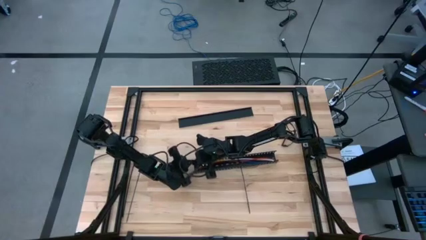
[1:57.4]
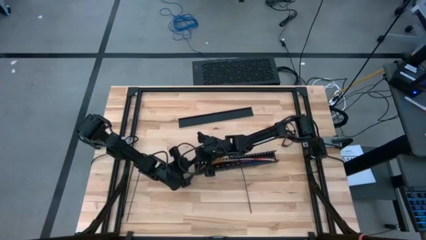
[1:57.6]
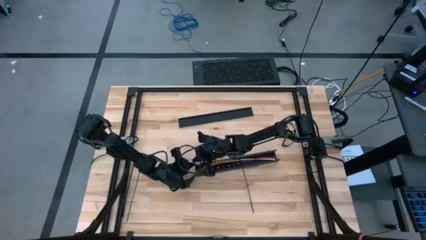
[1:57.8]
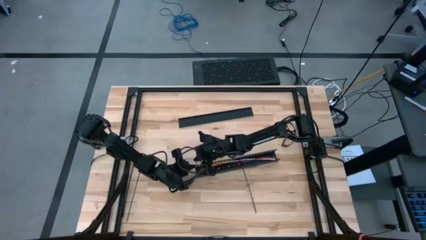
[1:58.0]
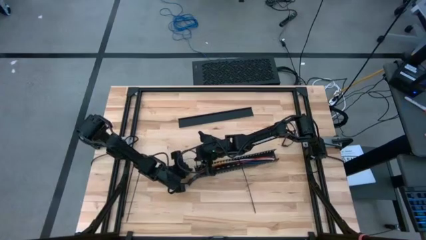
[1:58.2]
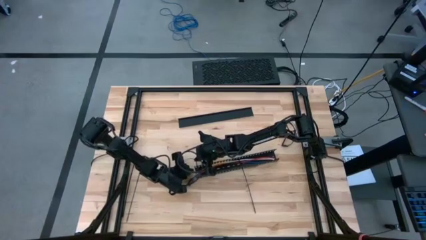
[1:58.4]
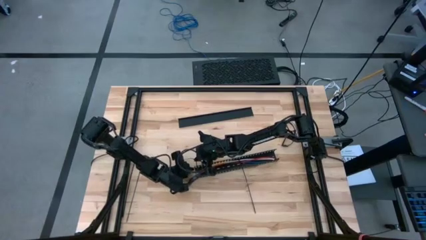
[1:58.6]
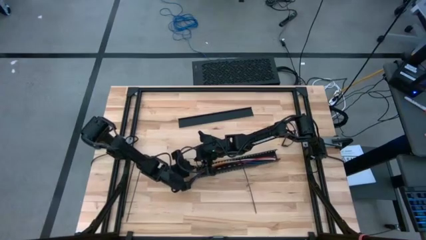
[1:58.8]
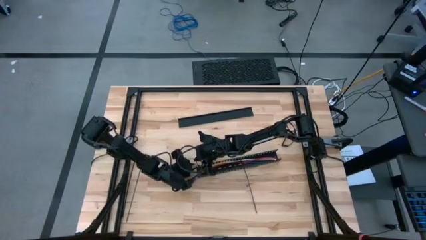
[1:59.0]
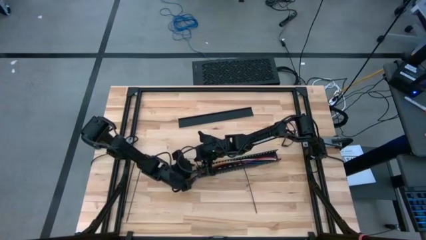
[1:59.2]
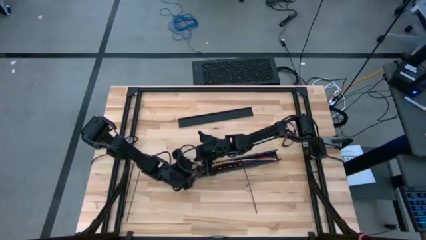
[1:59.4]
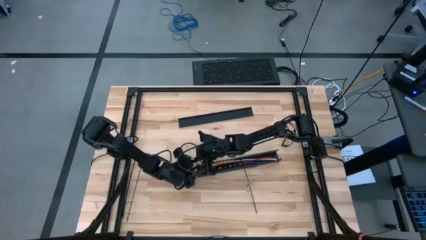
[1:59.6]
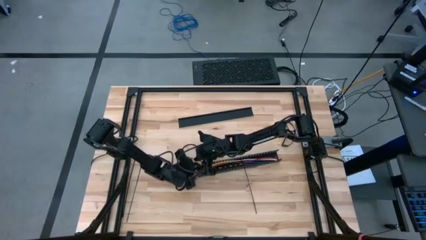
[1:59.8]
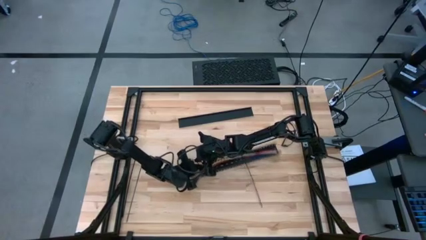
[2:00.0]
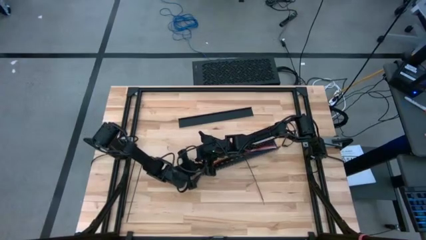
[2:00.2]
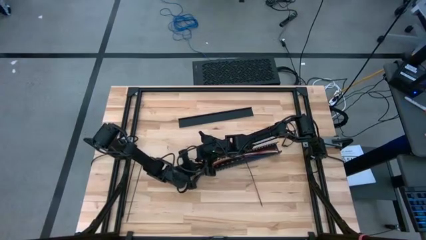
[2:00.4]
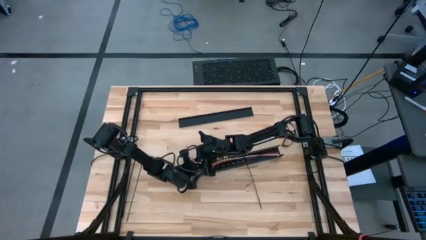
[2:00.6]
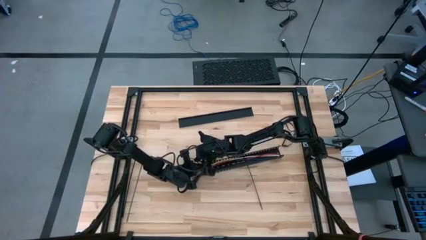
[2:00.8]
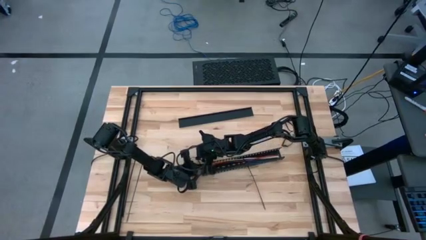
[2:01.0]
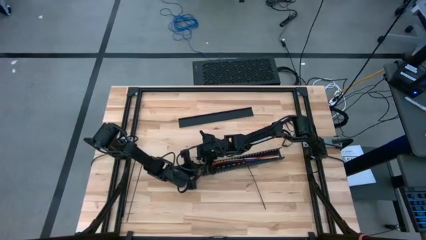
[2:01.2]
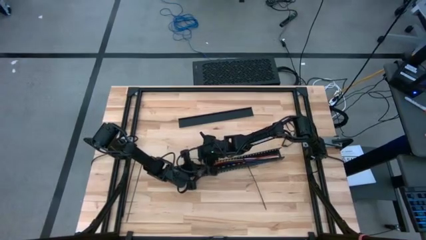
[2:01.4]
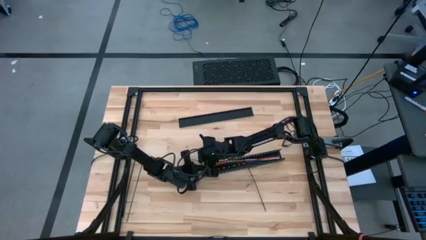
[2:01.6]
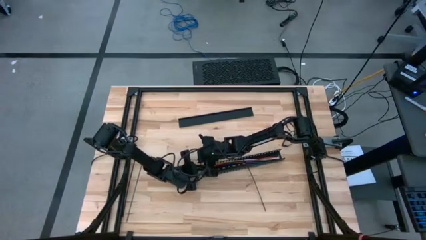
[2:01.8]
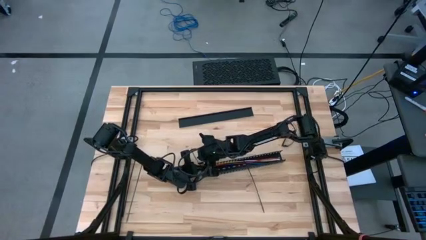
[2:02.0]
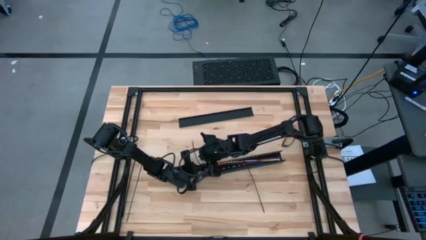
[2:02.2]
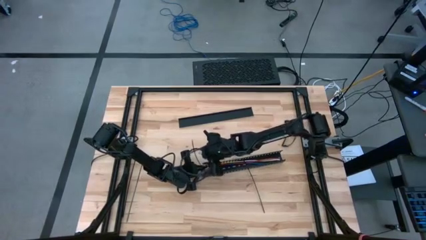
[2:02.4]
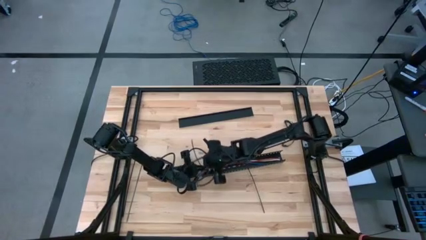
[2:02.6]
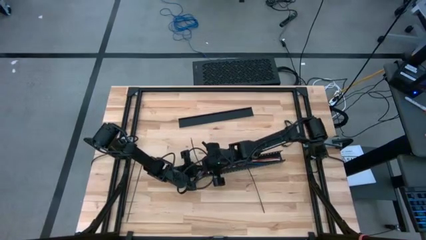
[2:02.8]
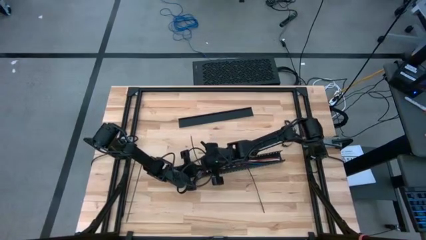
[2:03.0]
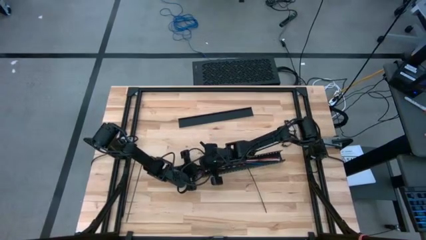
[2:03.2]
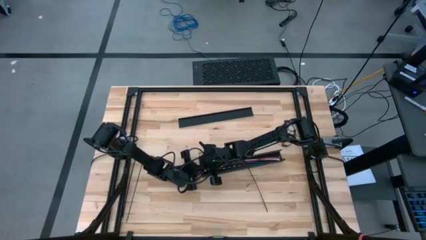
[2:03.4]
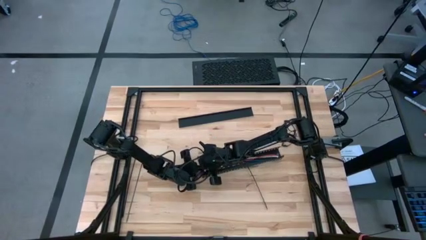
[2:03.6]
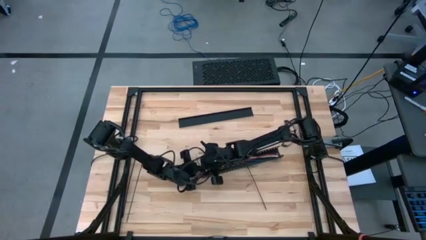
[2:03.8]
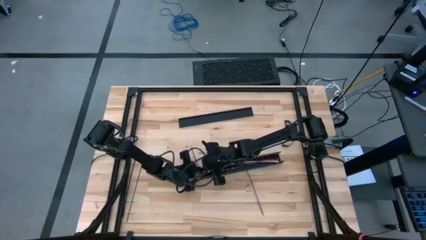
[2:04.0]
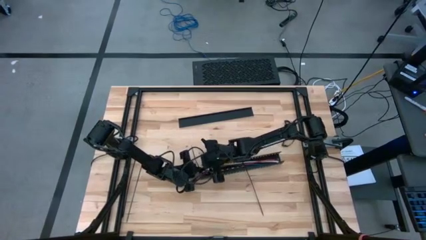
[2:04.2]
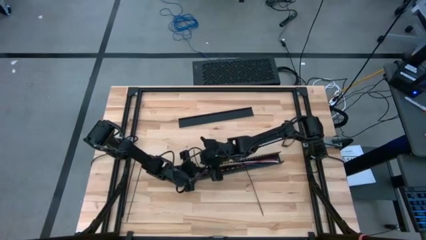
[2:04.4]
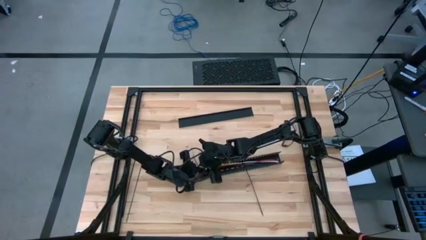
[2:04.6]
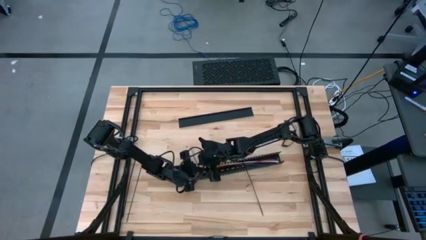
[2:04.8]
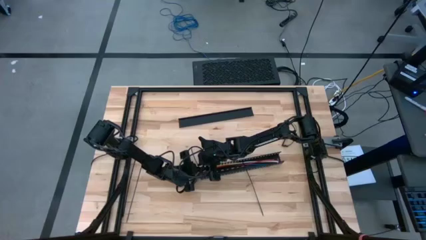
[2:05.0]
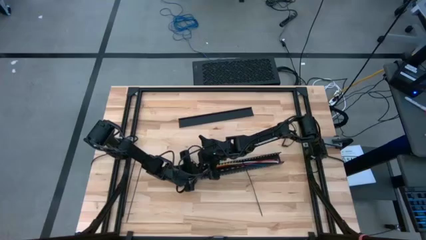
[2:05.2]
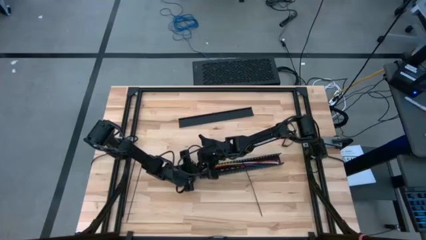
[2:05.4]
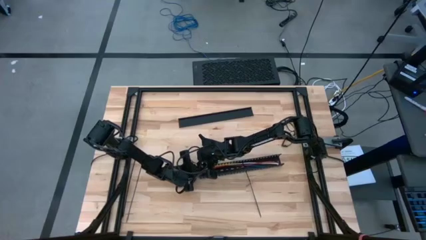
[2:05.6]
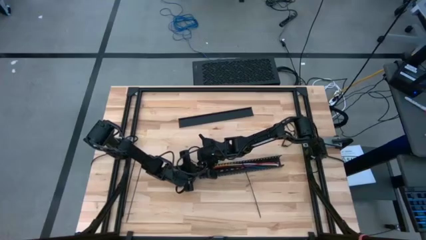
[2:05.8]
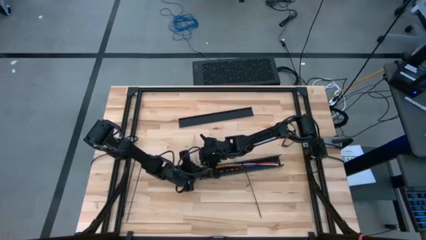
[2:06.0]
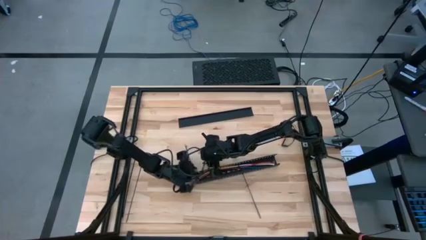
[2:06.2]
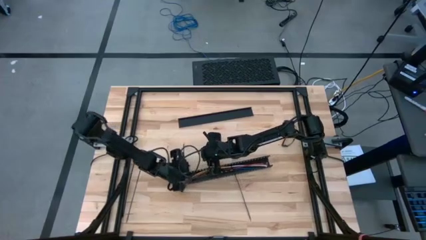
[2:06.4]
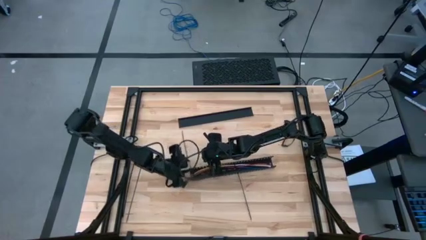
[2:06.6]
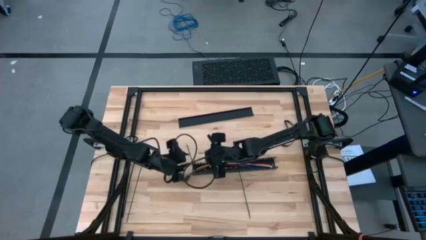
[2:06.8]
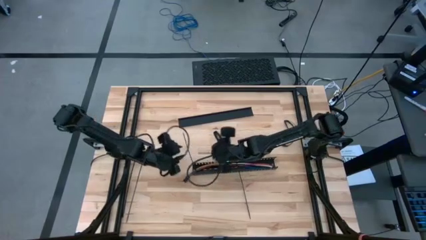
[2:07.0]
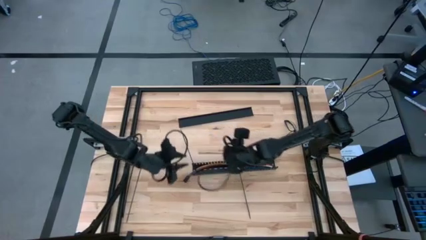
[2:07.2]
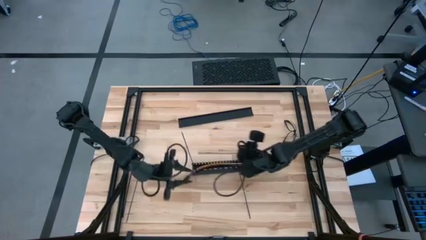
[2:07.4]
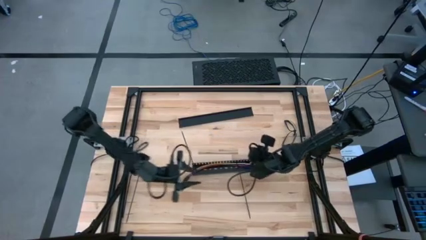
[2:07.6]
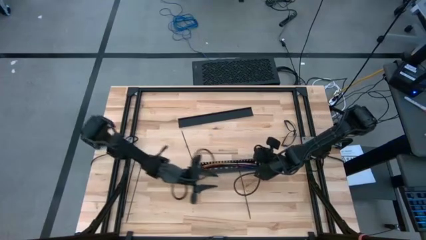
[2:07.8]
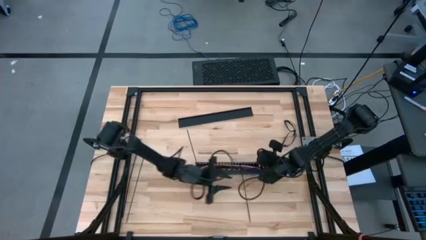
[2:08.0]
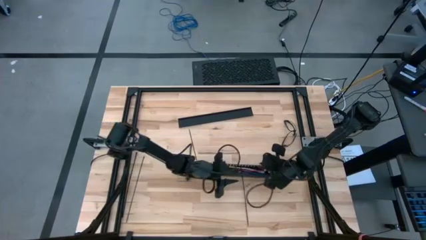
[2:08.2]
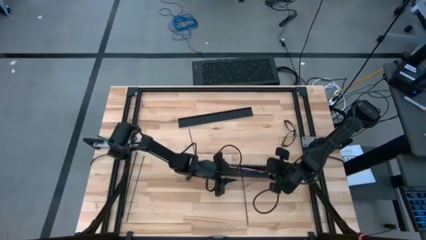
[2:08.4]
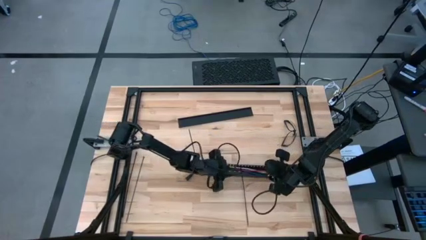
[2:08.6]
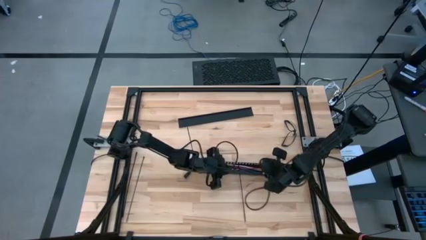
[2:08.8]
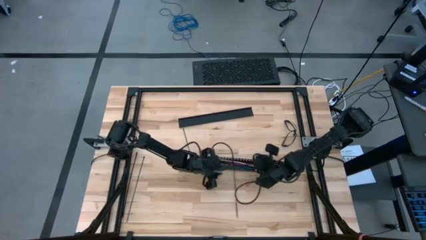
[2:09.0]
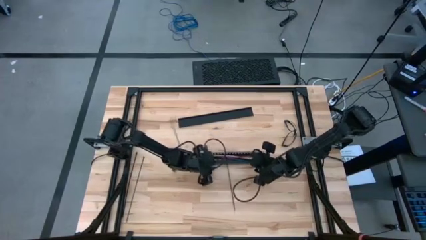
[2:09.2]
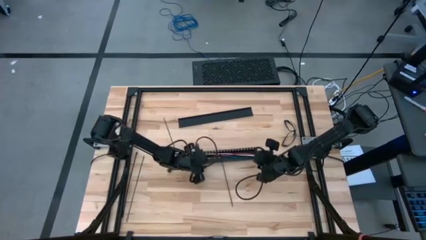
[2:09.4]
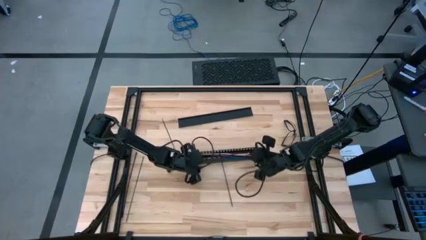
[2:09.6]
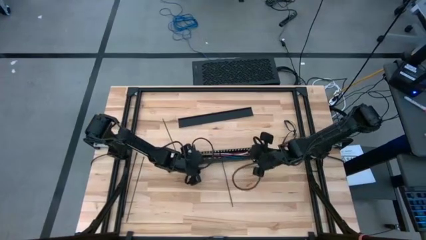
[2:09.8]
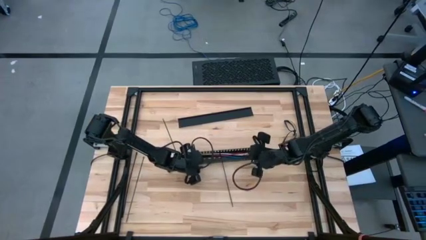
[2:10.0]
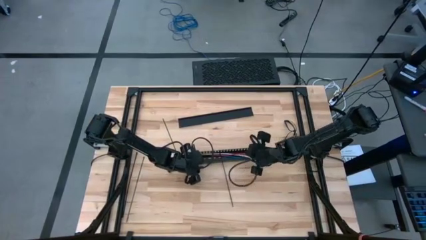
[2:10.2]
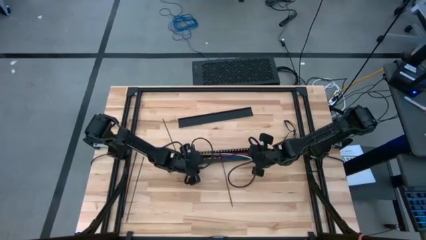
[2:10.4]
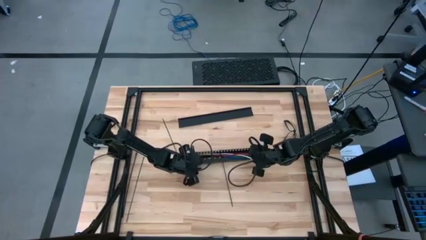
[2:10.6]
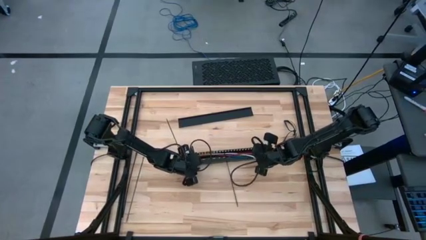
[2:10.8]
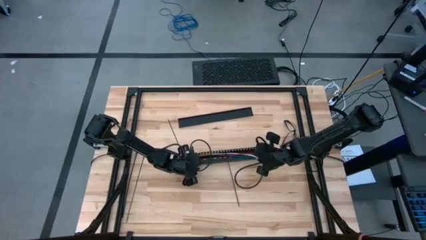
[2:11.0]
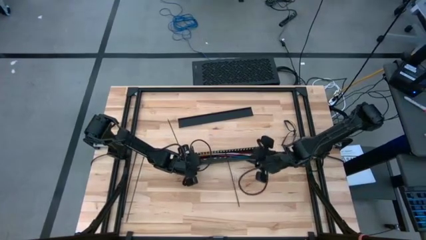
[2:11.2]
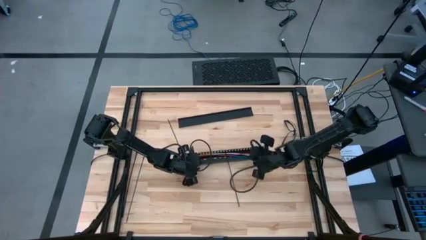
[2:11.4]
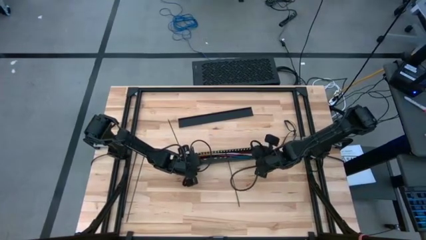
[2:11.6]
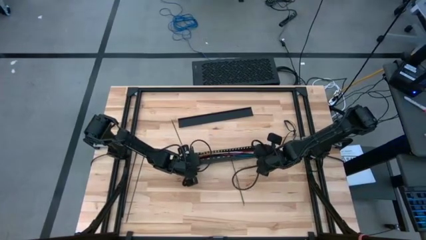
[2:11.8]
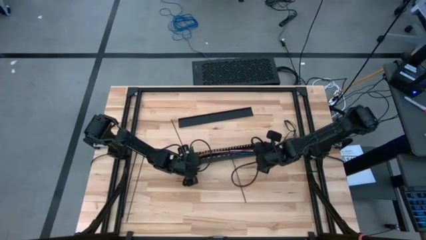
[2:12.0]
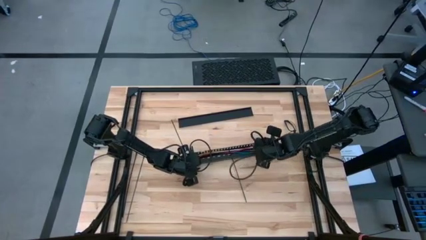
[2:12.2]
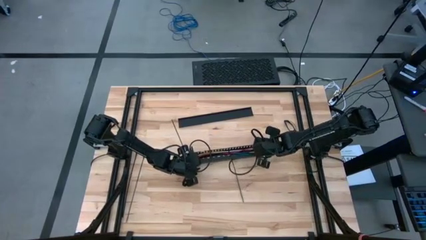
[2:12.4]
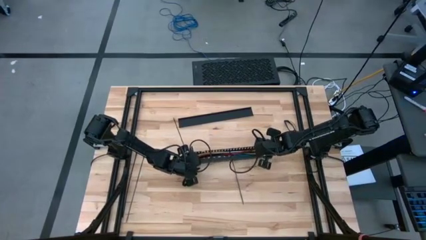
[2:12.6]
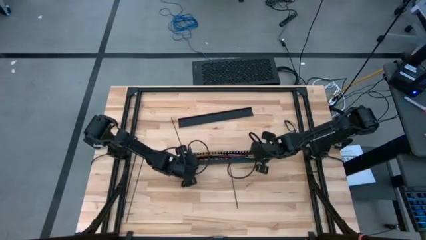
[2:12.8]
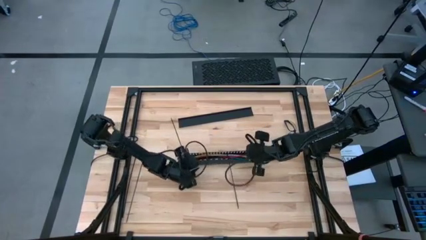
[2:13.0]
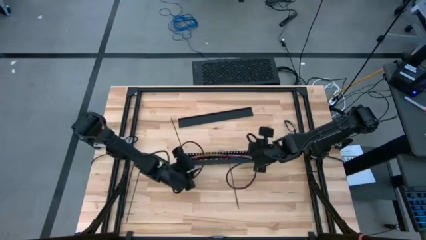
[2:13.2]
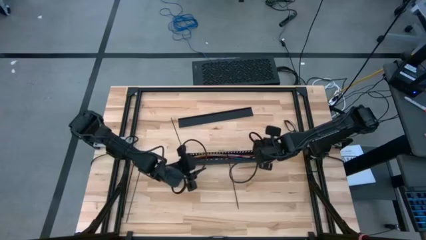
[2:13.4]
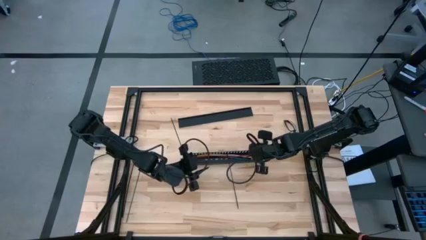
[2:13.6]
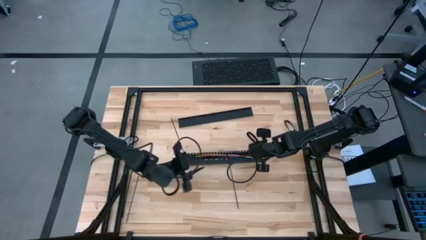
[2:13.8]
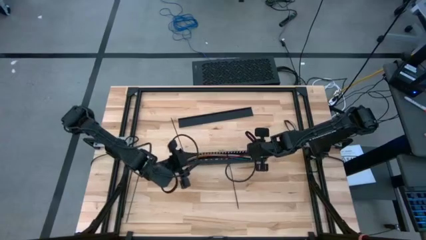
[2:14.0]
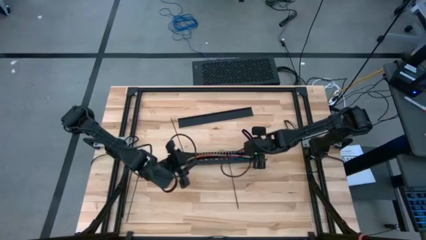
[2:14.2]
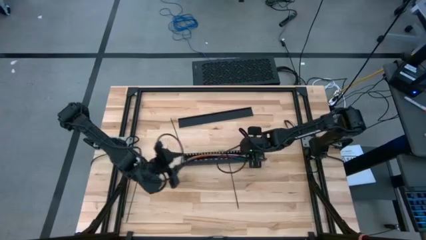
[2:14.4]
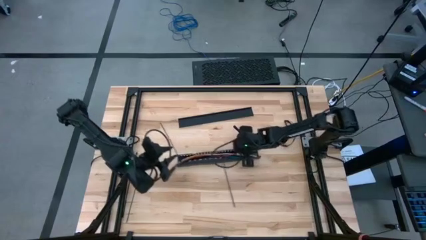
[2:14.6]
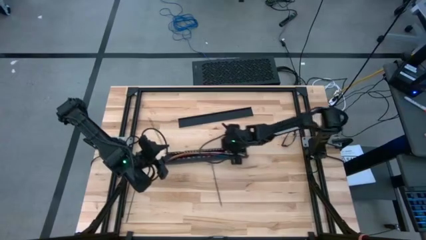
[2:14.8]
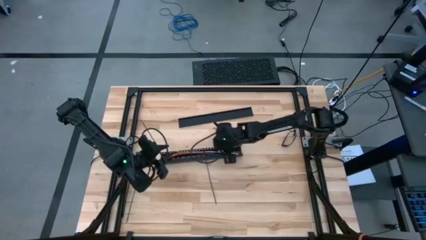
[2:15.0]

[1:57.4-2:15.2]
Task: Ziptie cables
Put the ziptied cables into the black cable duct
